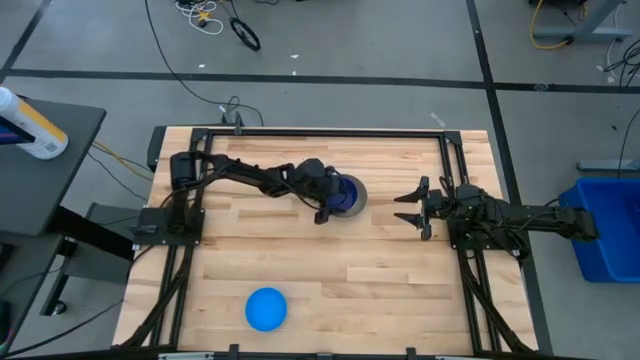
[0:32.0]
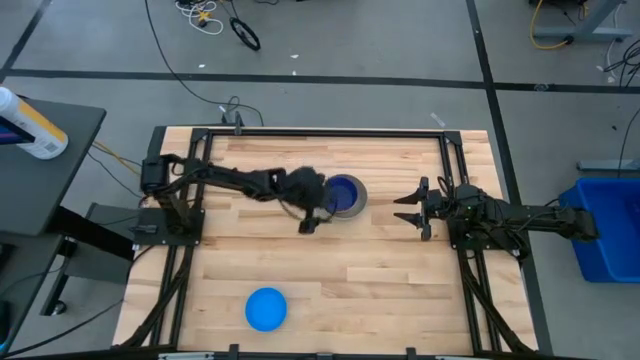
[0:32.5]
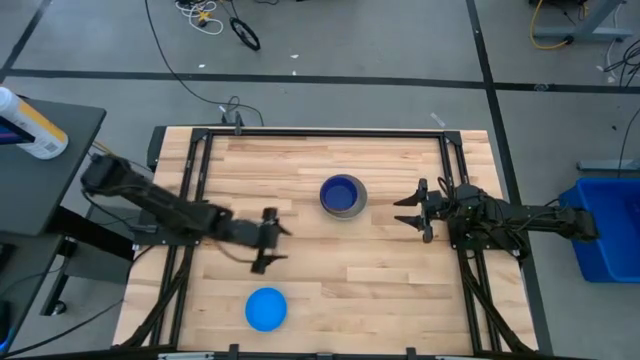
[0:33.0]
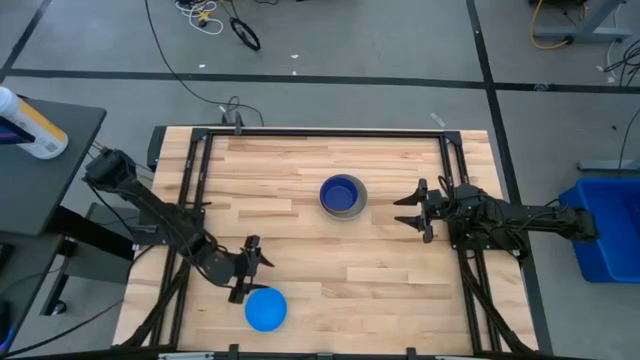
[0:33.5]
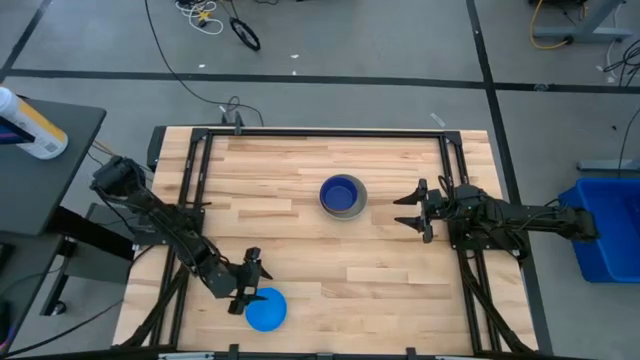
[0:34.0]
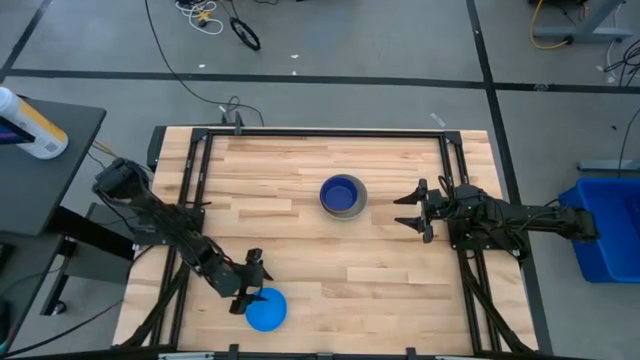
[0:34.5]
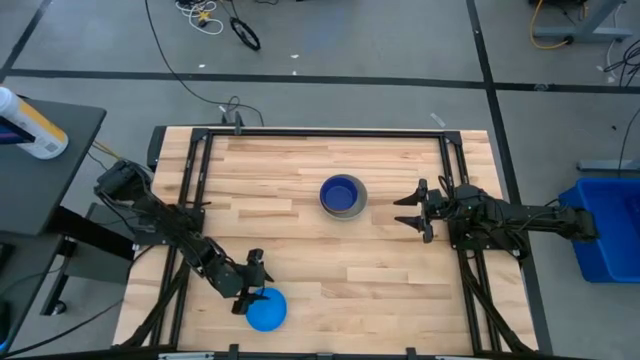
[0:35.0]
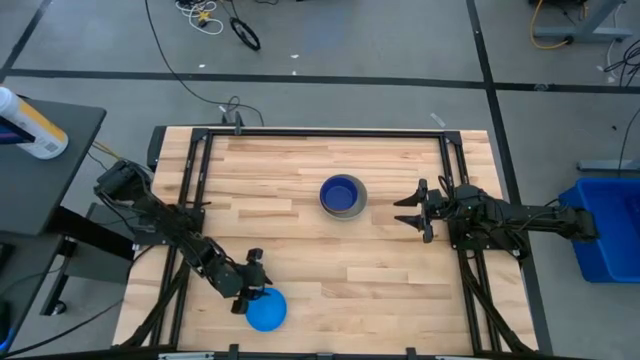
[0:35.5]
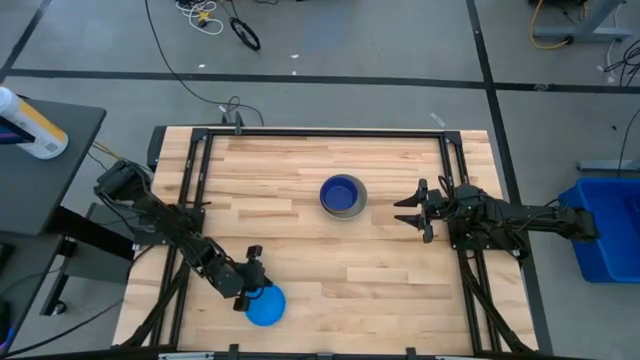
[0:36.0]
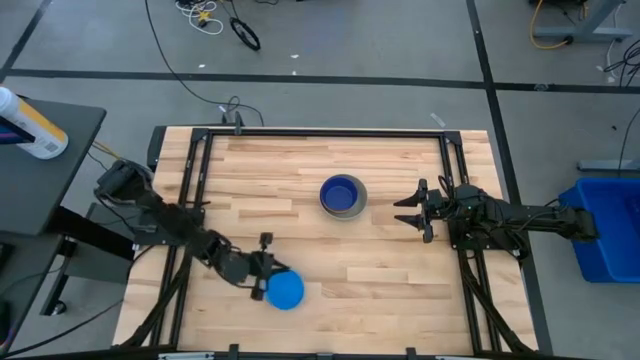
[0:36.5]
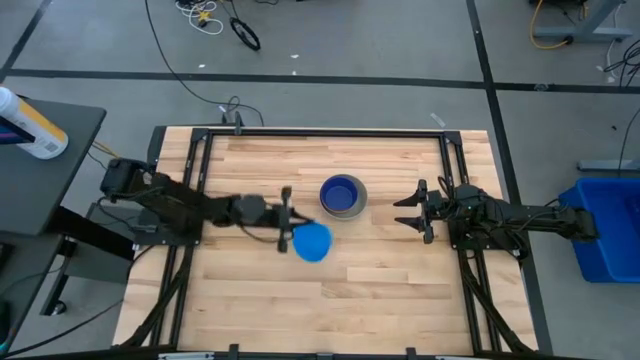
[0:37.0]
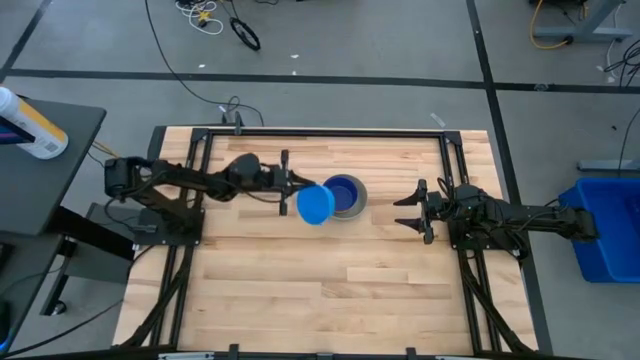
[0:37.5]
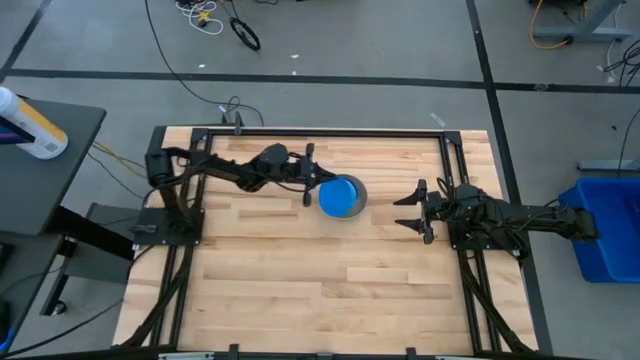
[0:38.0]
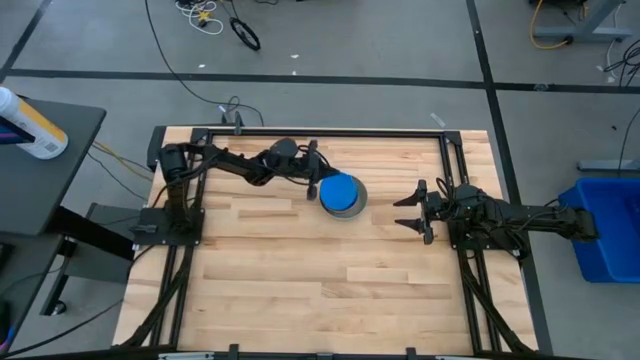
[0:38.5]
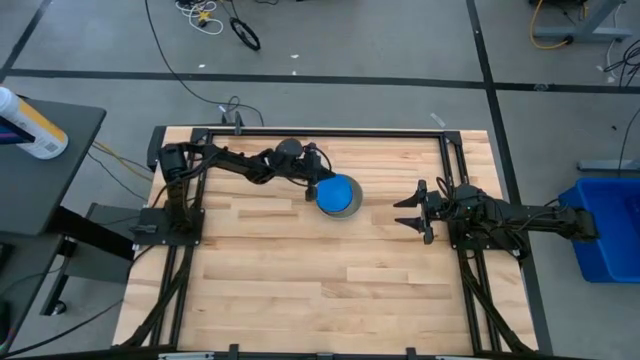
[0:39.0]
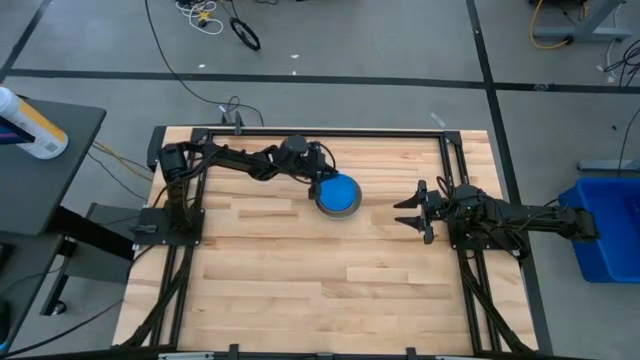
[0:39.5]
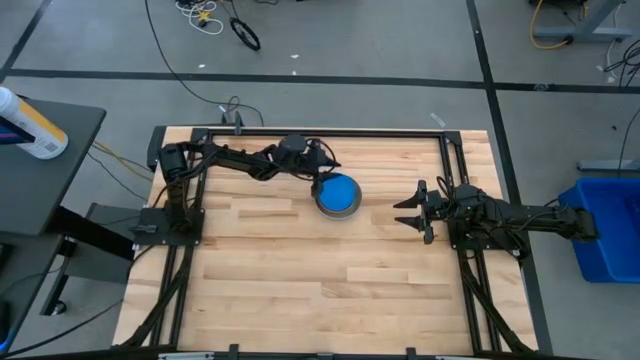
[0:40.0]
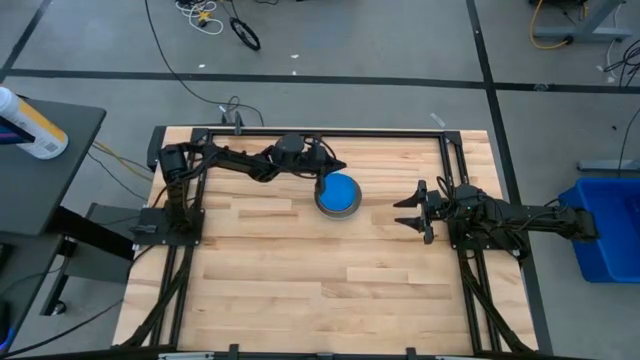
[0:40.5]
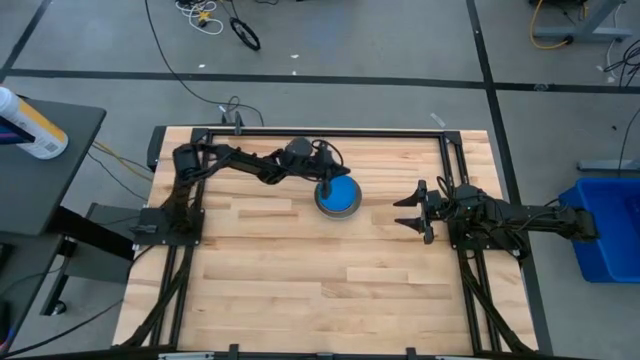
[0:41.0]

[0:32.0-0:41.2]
Stack the blue bowl on top of the dark blue bowl

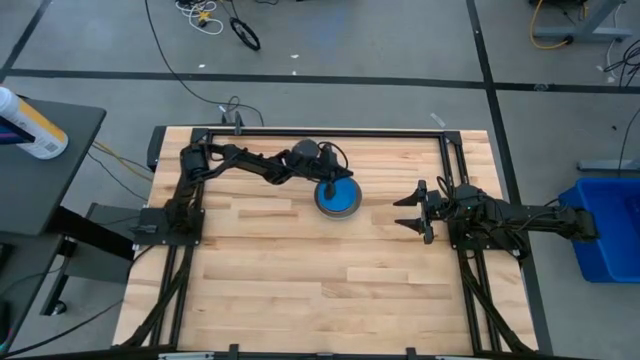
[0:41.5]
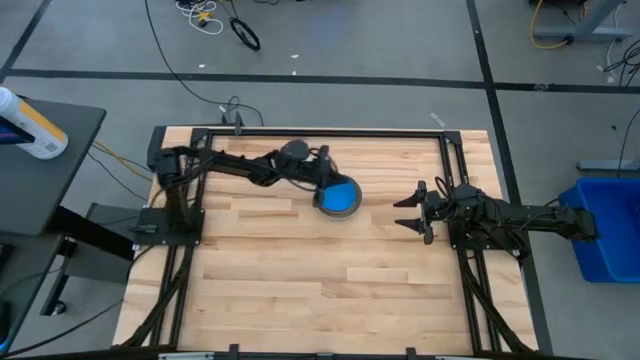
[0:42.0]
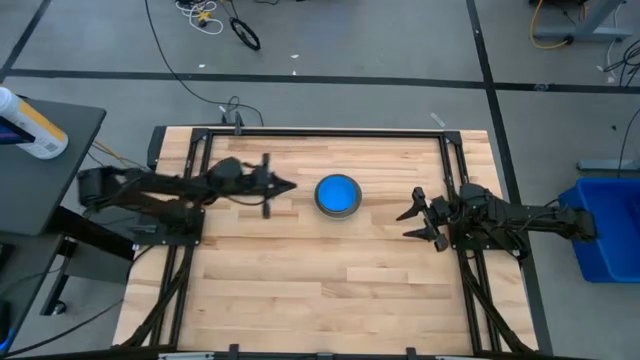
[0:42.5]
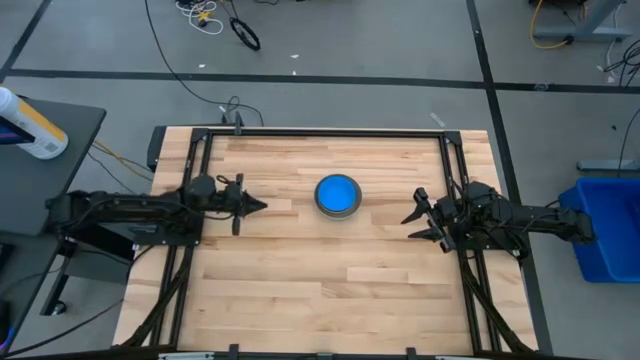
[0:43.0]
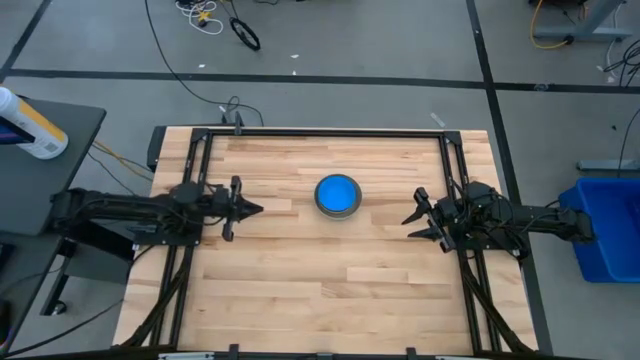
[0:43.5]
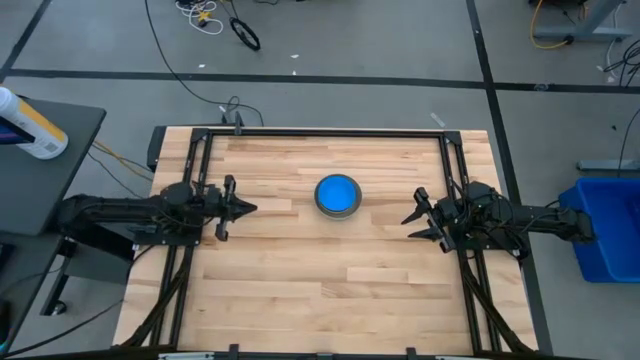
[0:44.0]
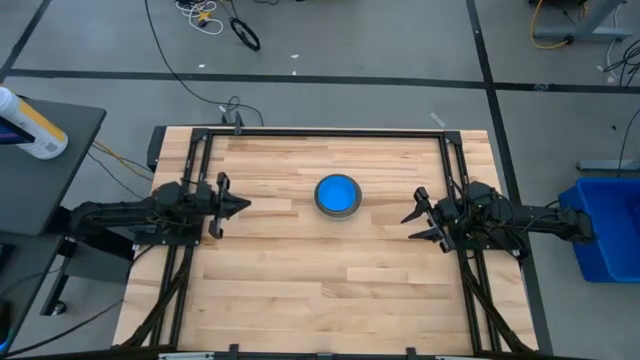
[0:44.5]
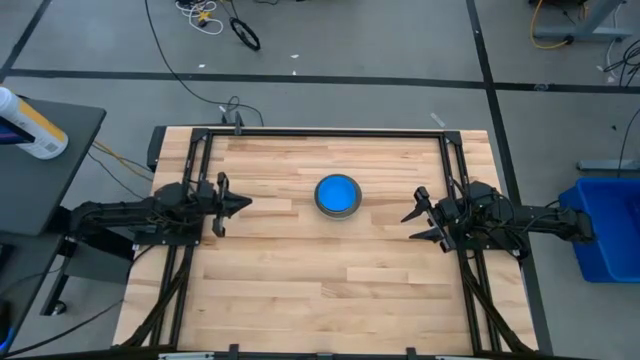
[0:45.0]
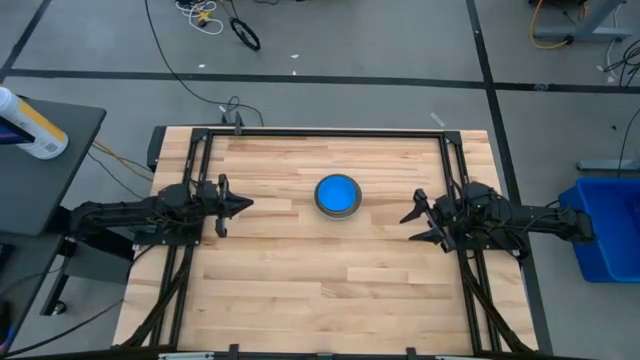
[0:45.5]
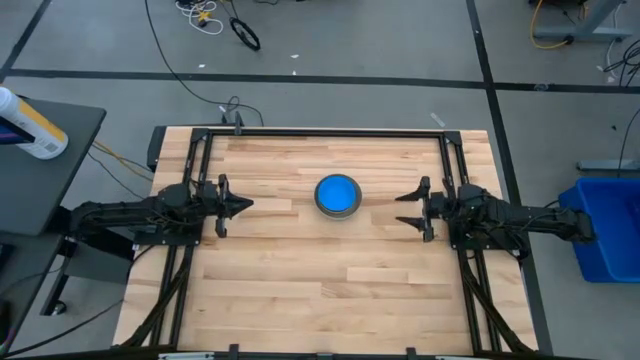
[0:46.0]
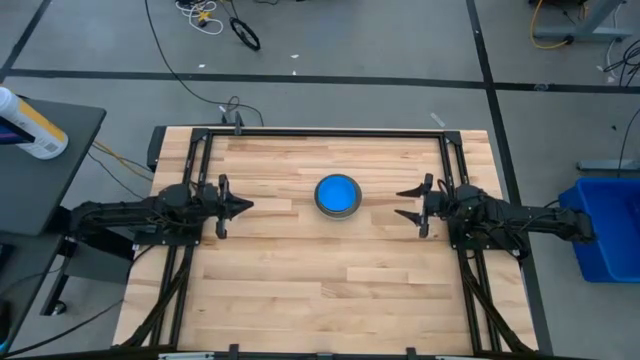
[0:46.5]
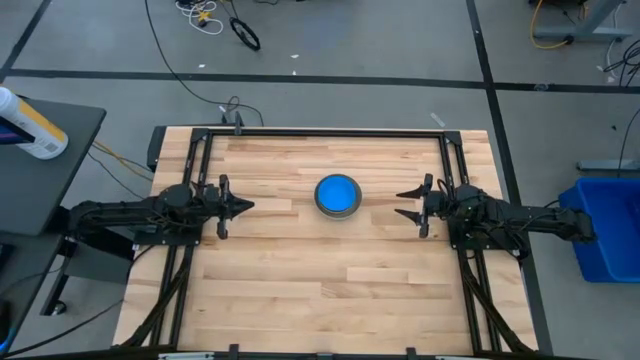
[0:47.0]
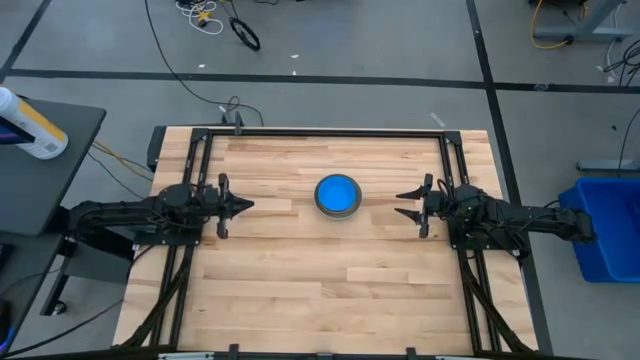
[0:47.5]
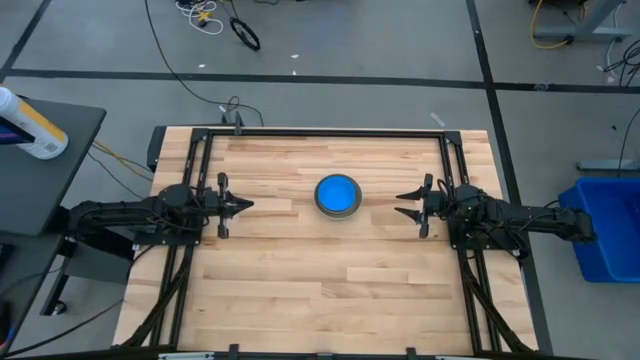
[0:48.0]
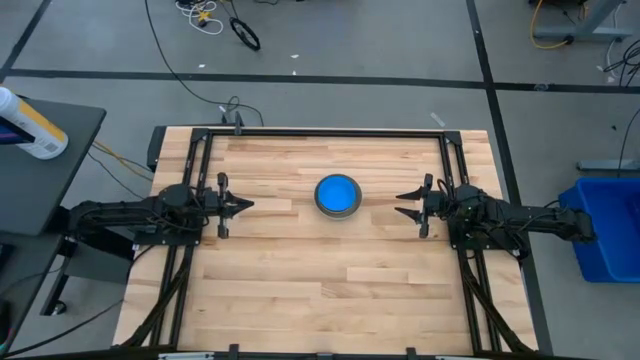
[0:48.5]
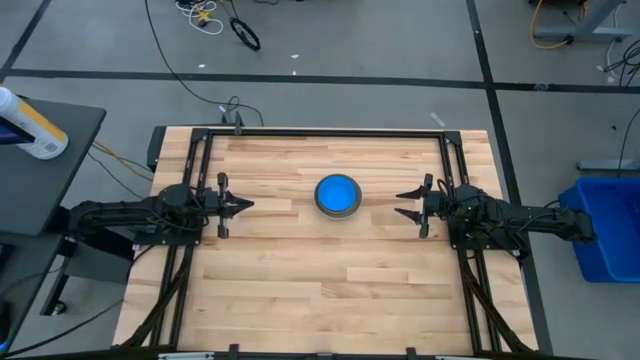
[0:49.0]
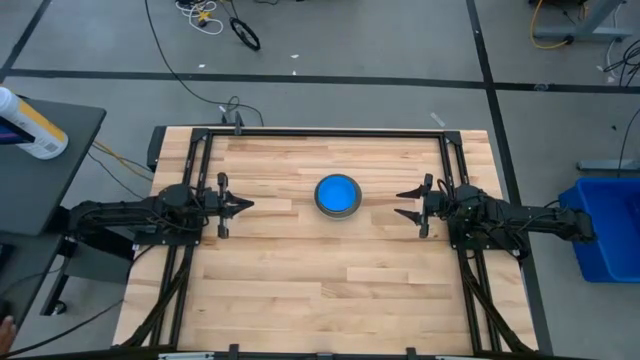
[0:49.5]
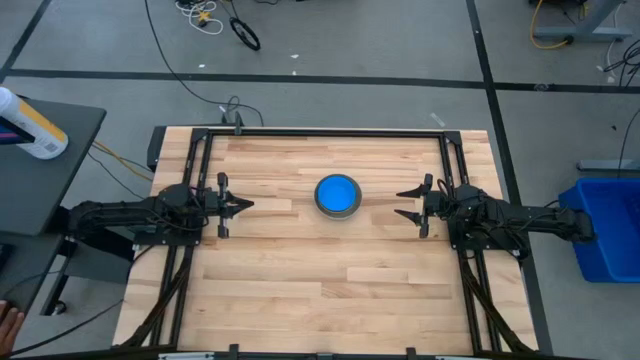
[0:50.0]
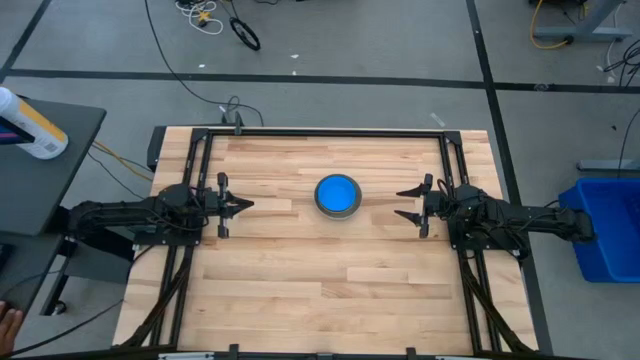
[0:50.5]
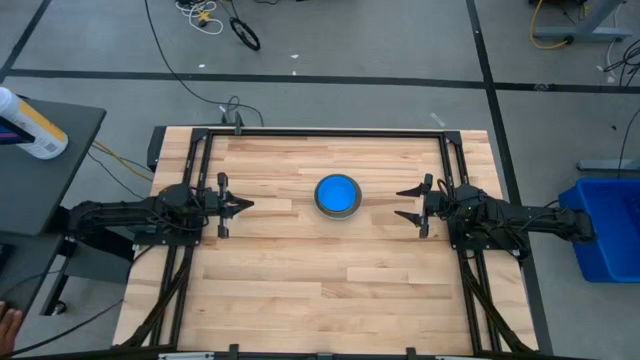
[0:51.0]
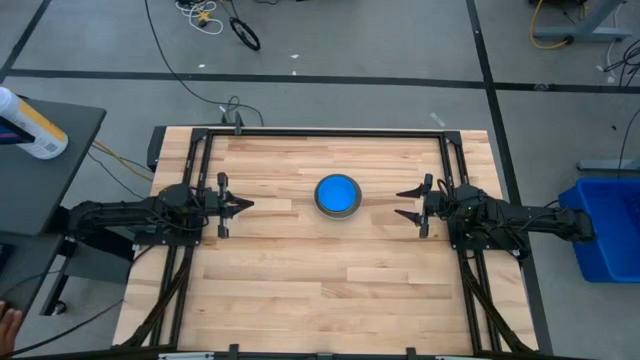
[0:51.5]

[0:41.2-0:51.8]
Return to Home Position
